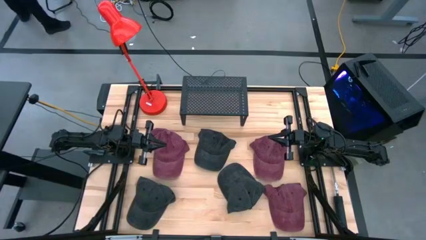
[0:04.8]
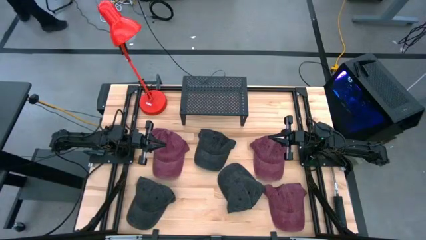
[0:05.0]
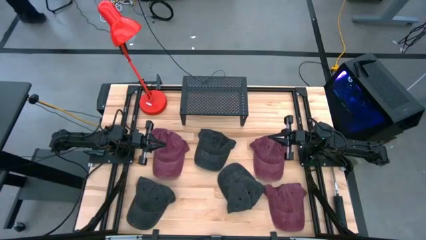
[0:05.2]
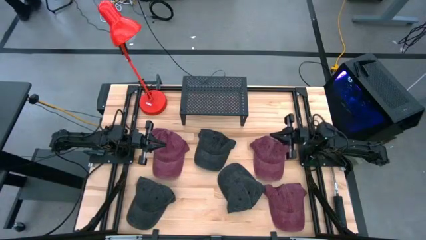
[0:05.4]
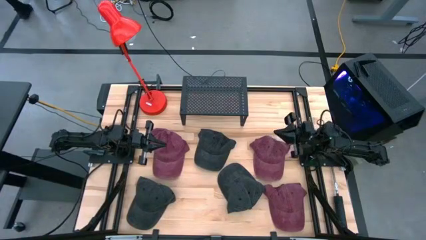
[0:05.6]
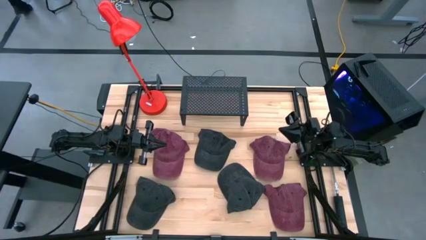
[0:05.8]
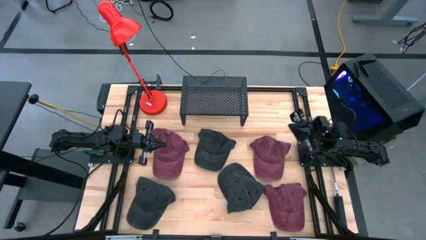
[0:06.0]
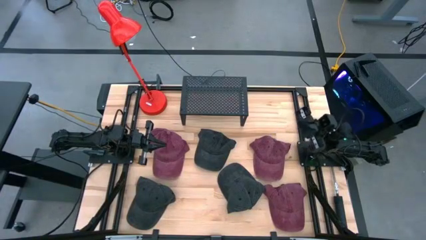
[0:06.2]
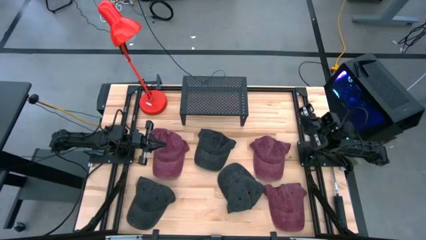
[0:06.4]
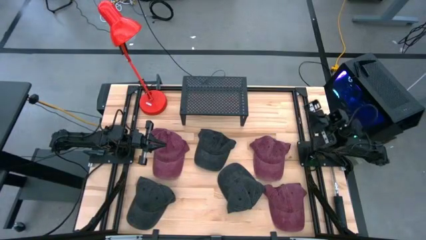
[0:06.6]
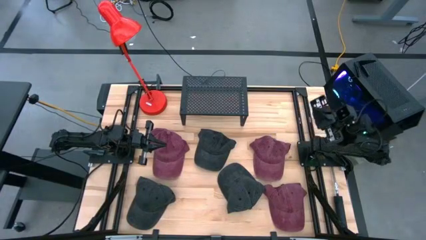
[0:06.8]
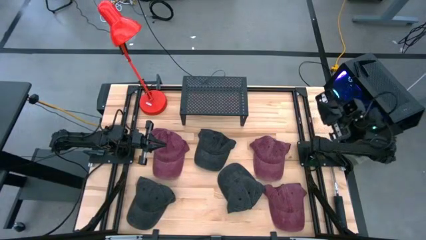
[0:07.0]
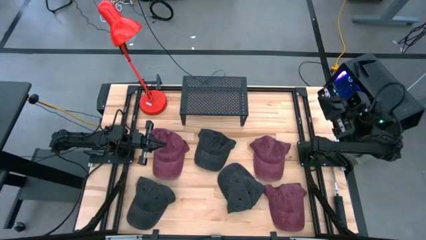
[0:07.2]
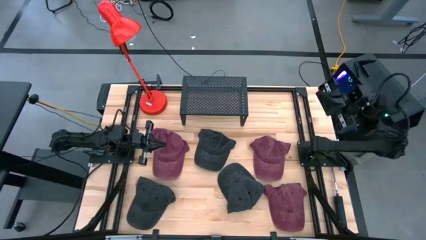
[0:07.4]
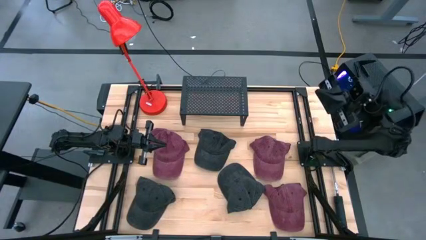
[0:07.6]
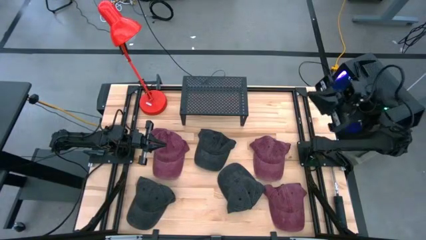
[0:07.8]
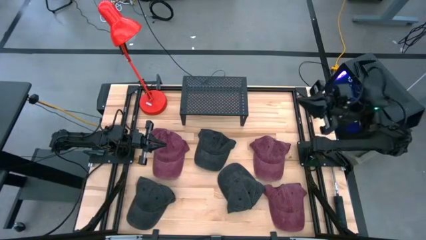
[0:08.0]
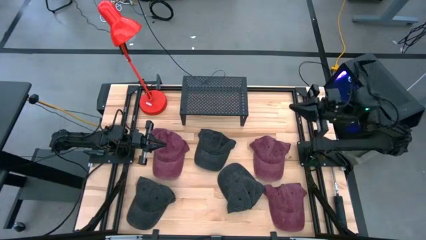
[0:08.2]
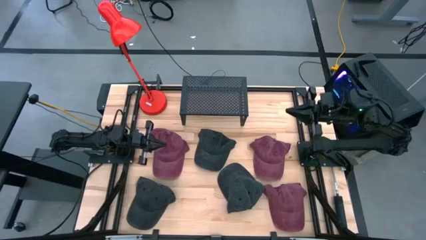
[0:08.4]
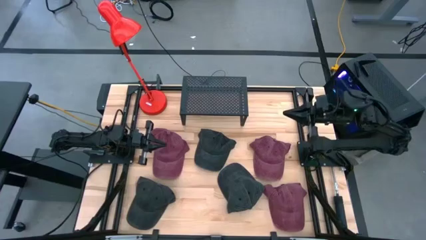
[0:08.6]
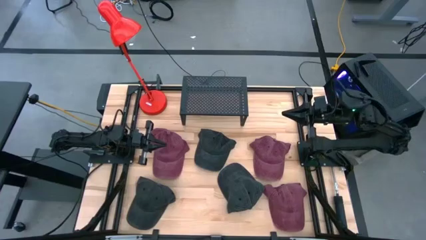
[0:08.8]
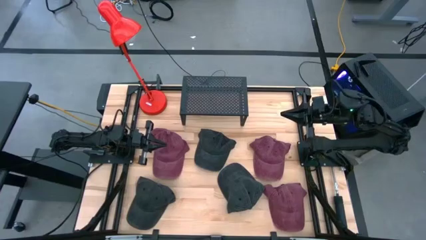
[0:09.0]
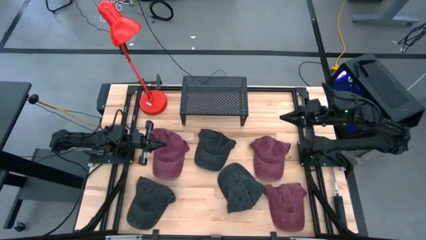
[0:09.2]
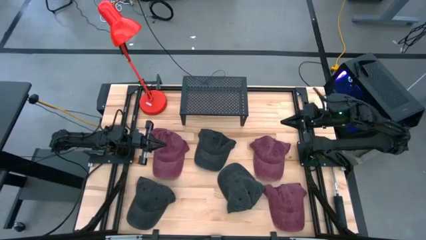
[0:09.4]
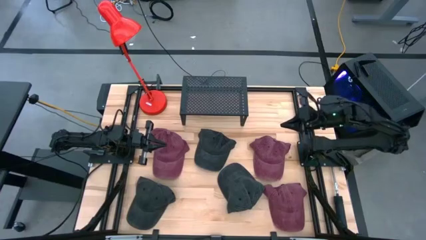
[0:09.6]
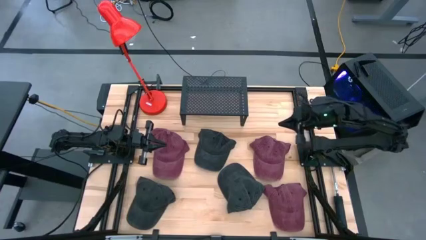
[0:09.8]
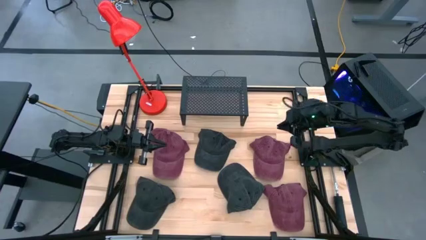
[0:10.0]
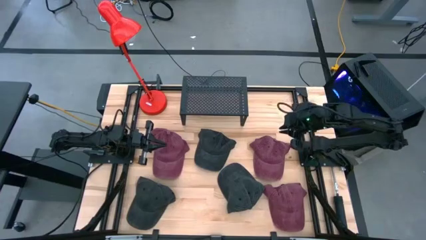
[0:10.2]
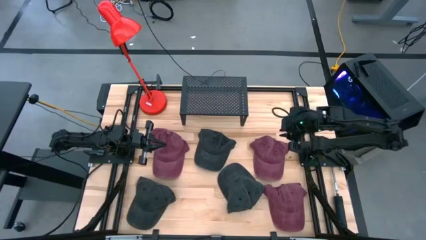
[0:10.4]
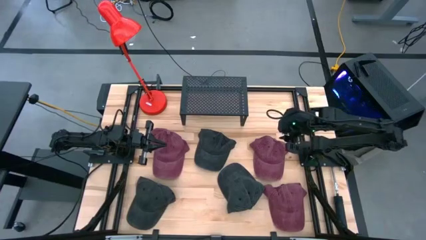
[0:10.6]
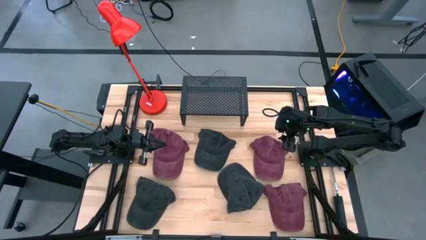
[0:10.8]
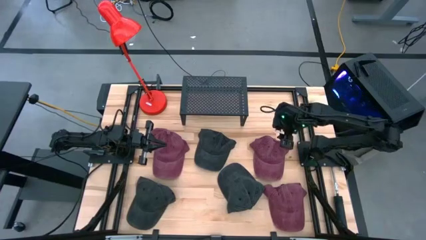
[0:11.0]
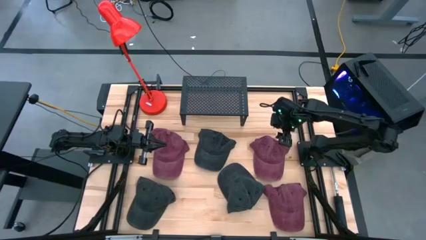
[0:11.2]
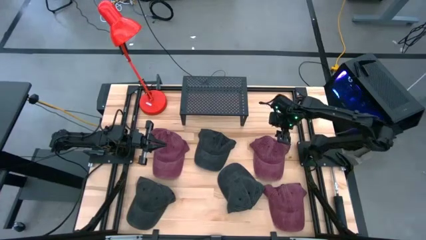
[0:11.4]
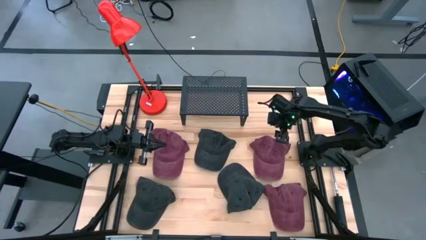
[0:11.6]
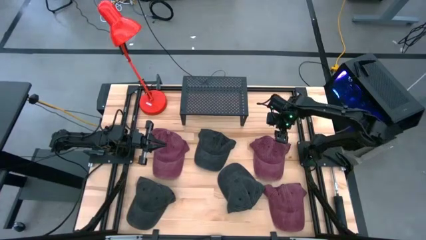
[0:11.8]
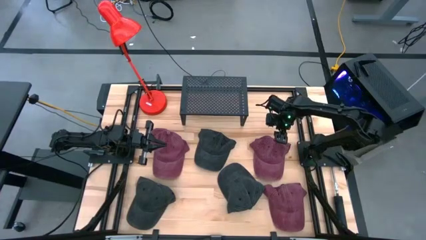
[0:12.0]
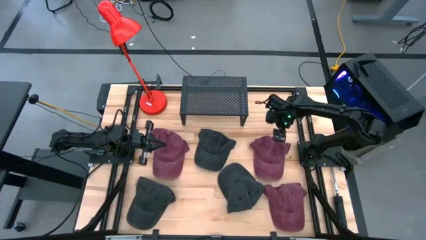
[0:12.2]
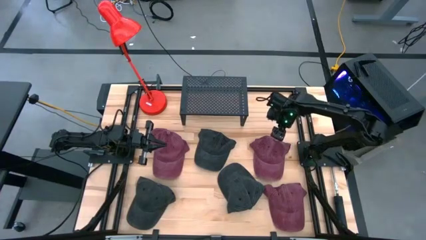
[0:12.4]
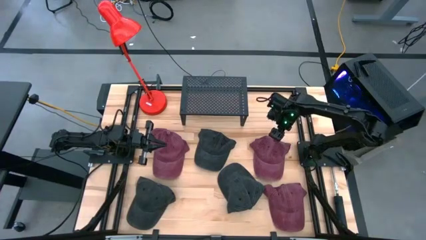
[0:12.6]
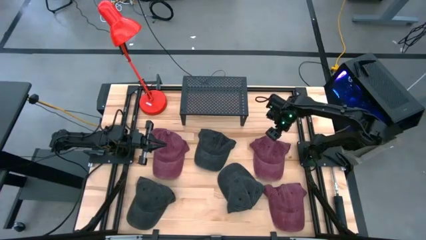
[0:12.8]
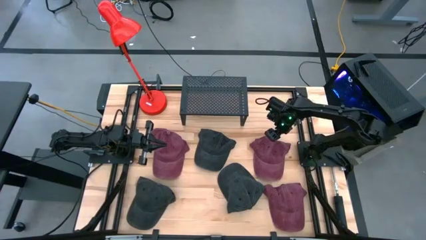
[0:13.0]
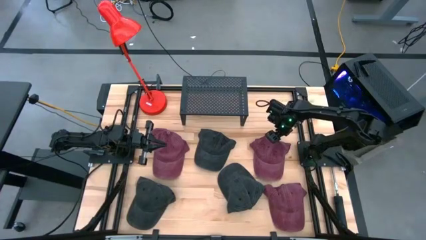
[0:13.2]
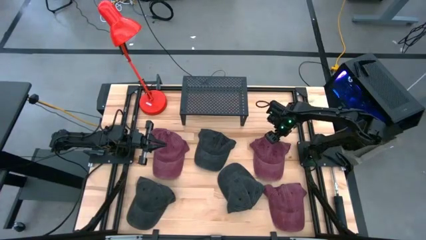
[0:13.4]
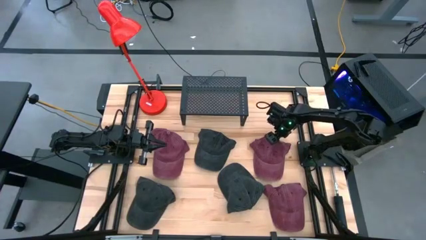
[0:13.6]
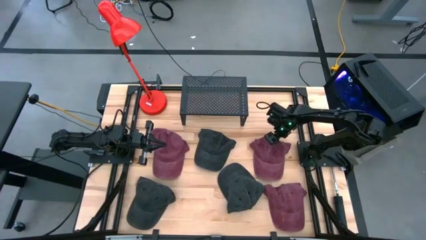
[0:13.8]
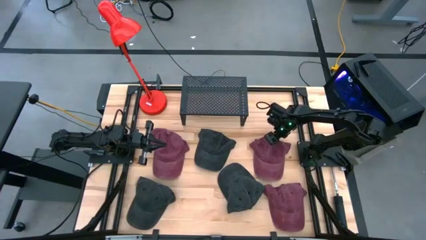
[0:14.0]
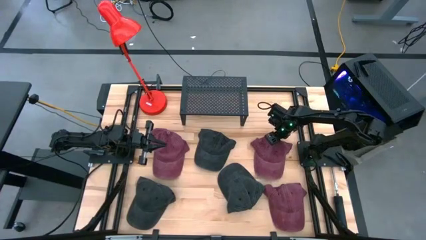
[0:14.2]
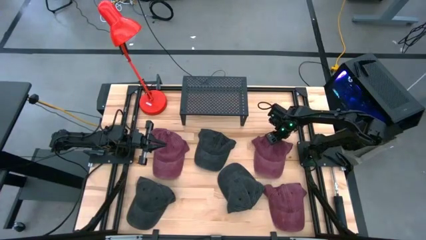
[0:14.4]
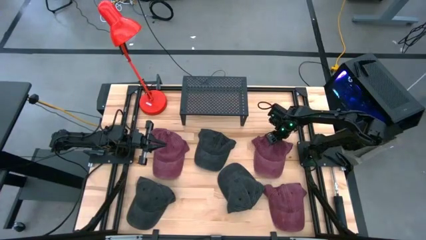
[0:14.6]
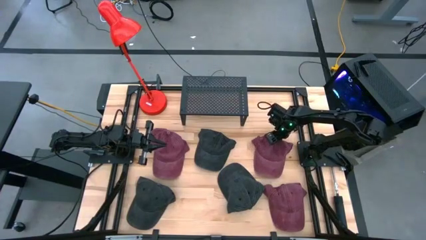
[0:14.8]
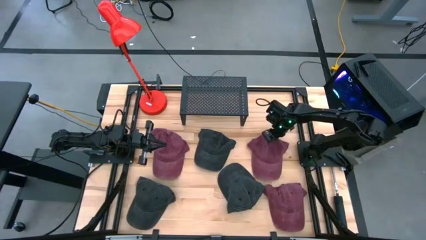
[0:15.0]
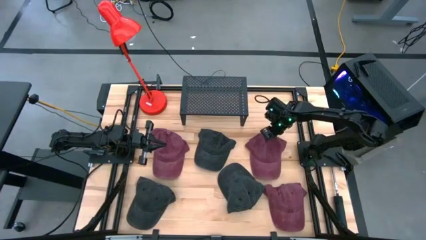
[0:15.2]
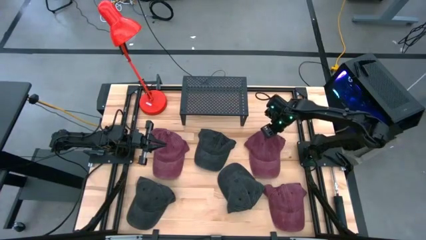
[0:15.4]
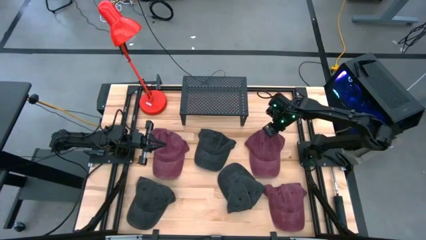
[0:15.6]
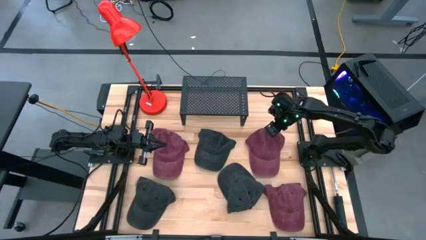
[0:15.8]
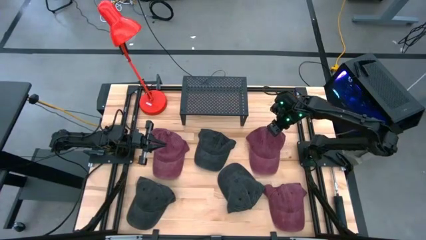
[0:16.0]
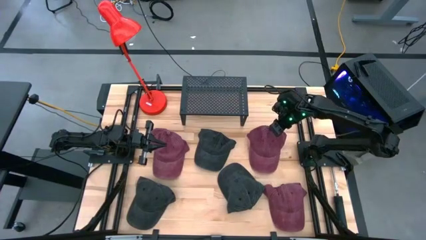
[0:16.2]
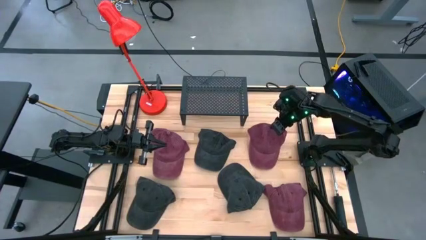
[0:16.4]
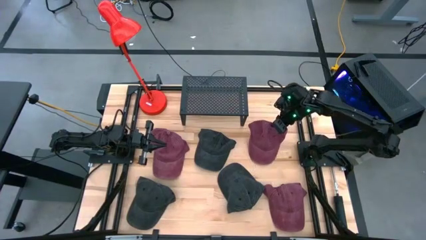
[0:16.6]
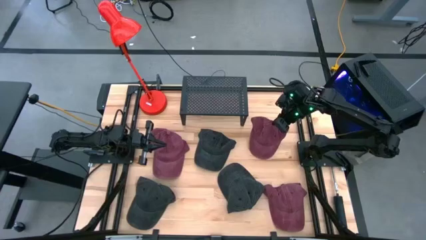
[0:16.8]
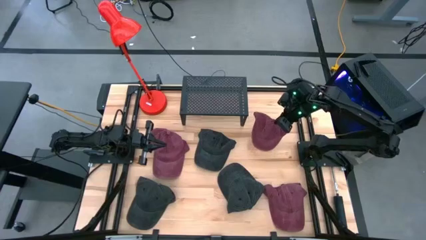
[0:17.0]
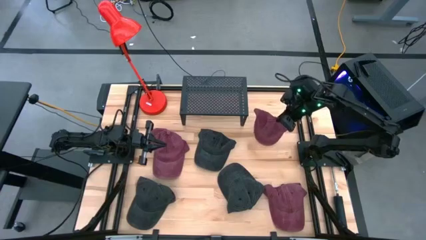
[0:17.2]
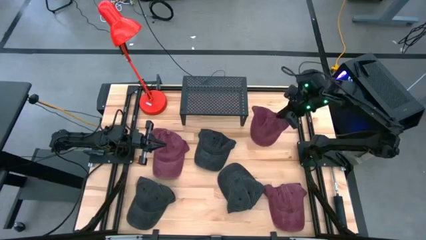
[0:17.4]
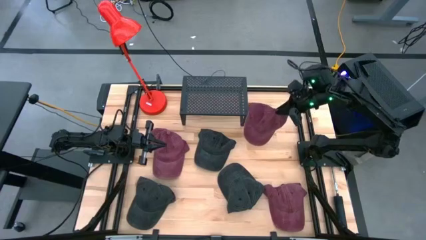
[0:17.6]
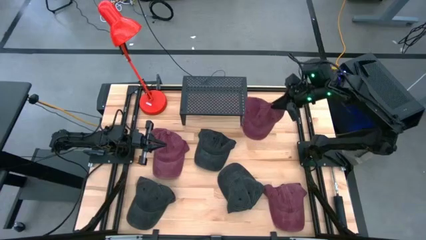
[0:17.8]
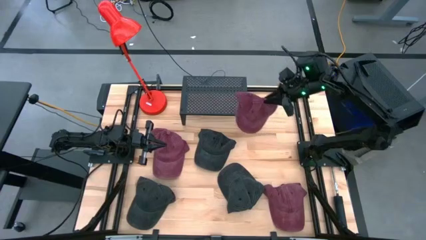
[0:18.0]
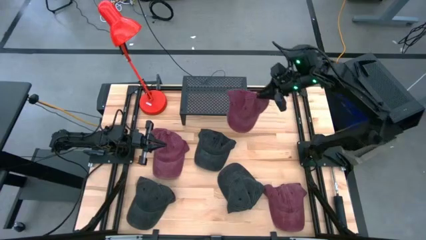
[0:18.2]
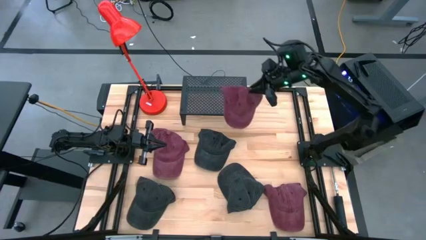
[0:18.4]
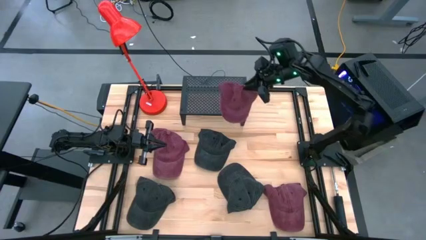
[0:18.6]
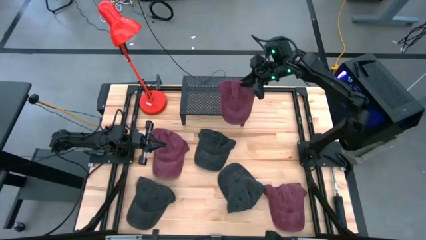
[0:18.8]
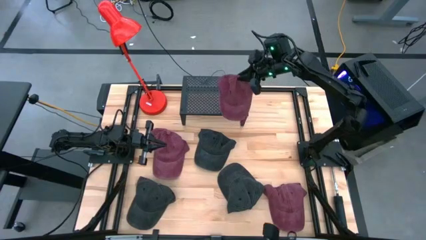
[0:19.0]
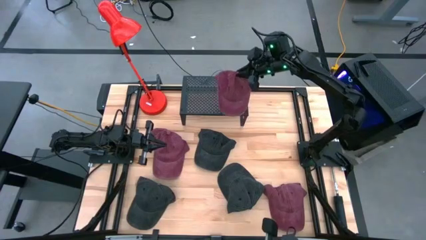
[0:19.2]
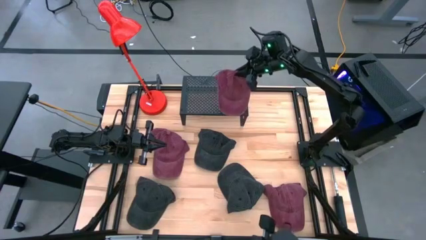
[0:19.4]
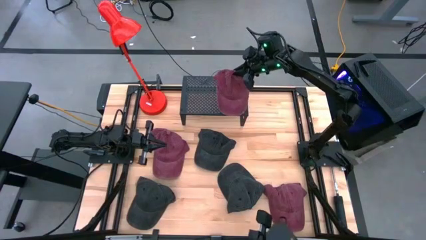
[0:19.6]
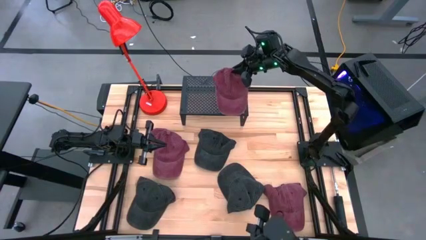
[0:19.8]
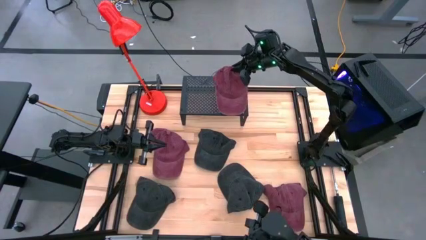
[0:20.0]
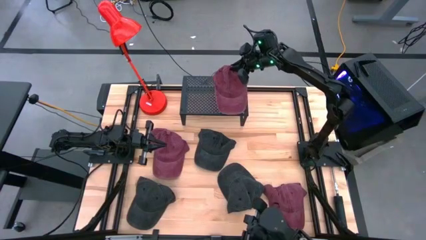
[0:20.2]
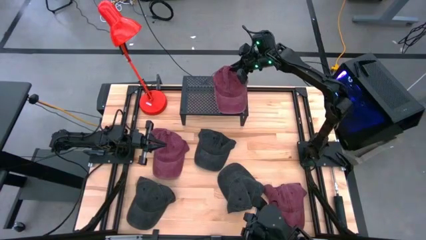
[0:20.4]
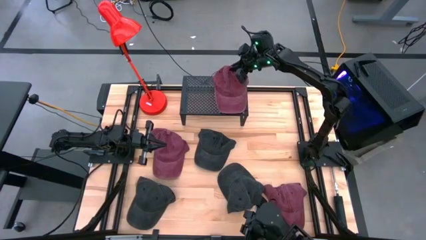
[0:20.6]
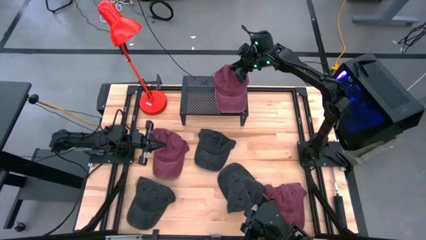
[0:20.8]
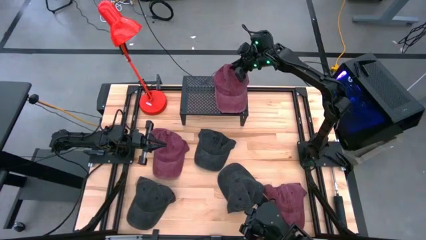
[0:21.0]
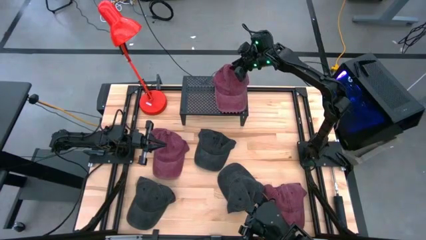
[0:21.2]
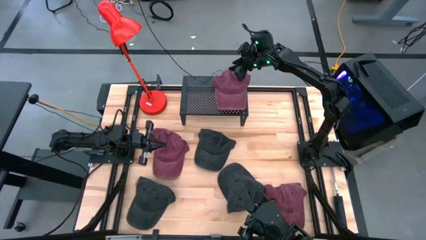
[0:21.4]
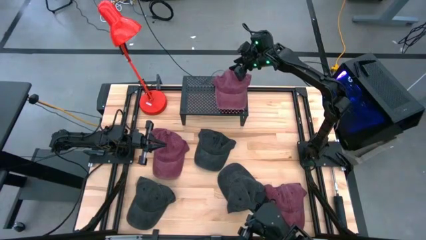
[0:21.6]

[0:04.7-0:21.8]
Task: Pick & Place hat
Put the top right red cap on the shelf
